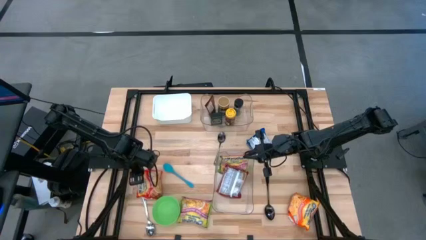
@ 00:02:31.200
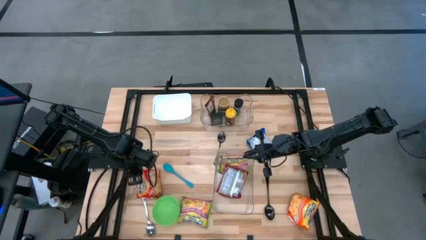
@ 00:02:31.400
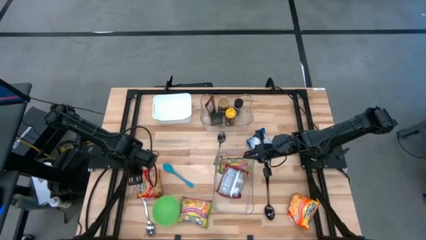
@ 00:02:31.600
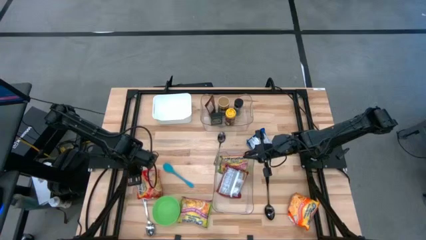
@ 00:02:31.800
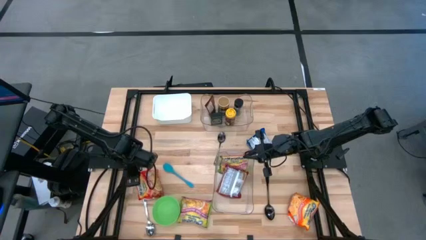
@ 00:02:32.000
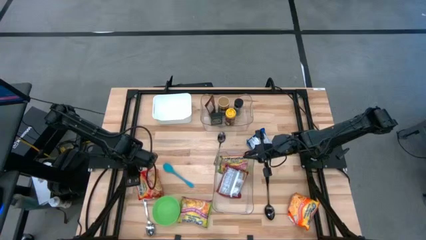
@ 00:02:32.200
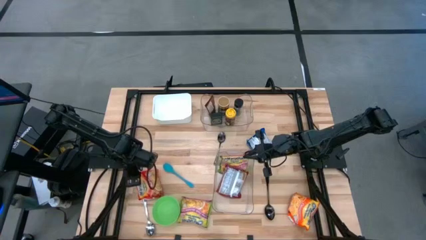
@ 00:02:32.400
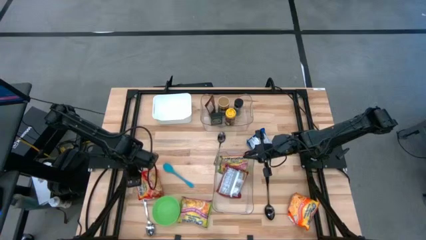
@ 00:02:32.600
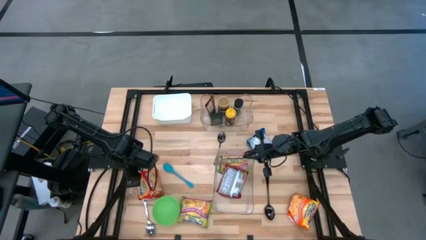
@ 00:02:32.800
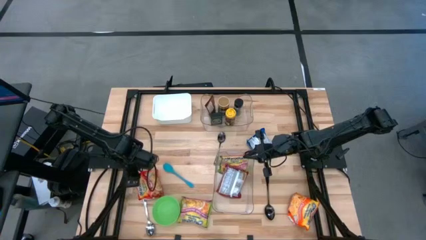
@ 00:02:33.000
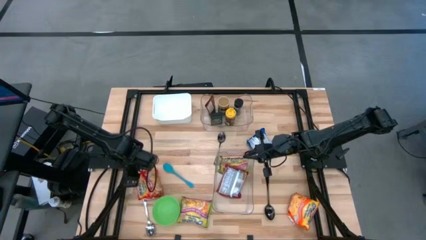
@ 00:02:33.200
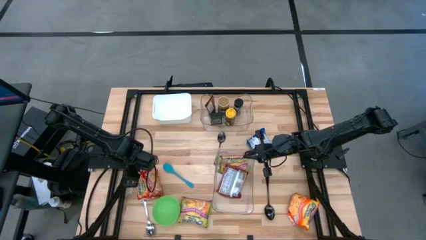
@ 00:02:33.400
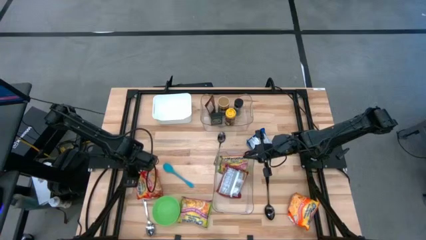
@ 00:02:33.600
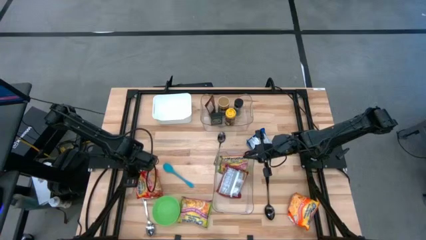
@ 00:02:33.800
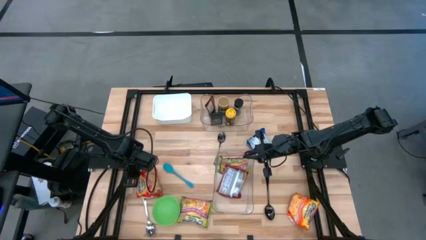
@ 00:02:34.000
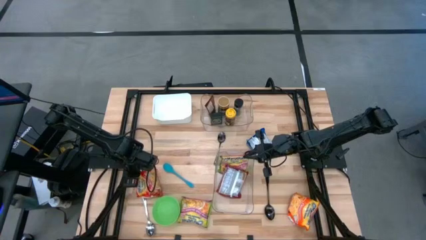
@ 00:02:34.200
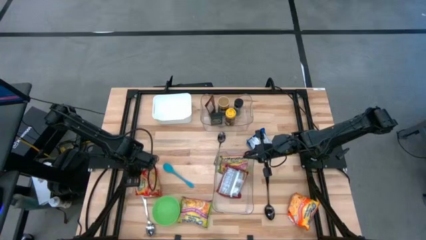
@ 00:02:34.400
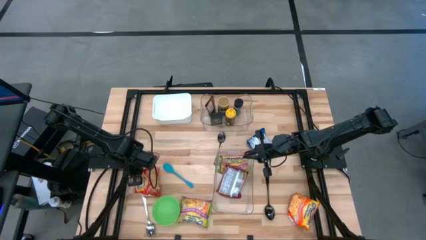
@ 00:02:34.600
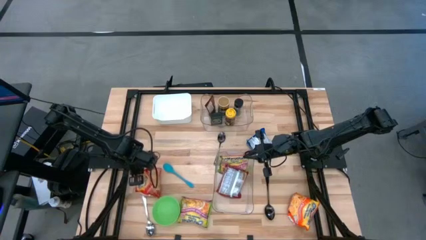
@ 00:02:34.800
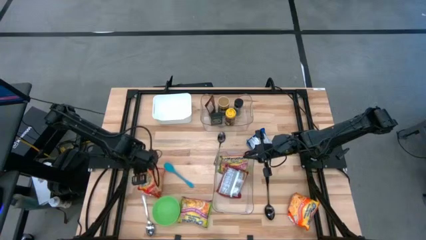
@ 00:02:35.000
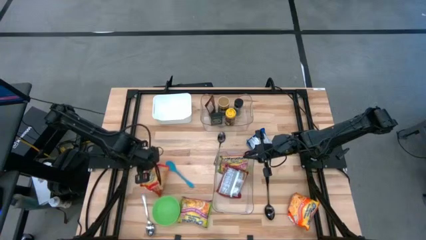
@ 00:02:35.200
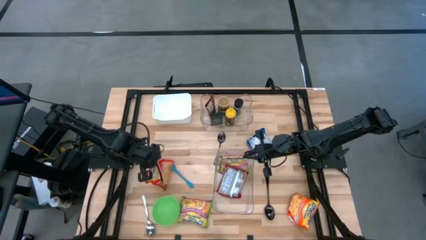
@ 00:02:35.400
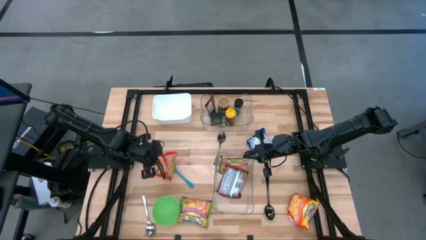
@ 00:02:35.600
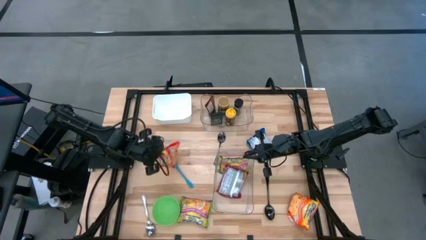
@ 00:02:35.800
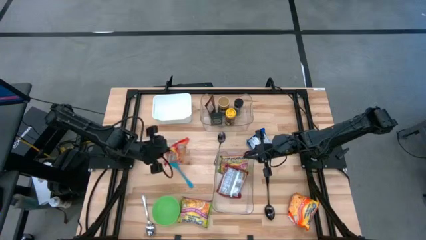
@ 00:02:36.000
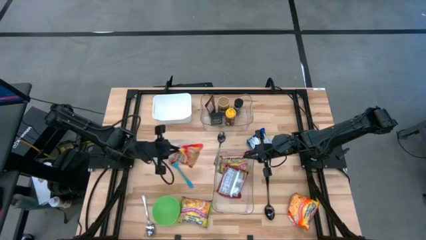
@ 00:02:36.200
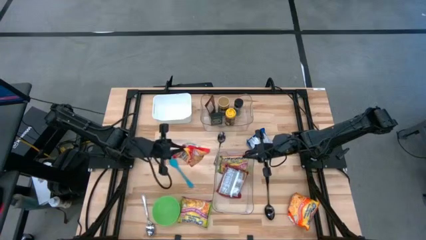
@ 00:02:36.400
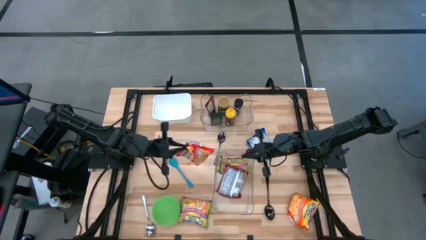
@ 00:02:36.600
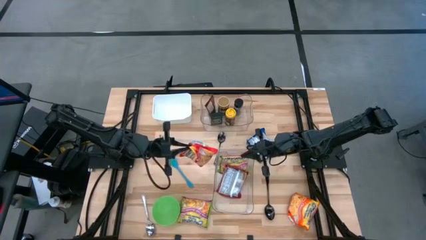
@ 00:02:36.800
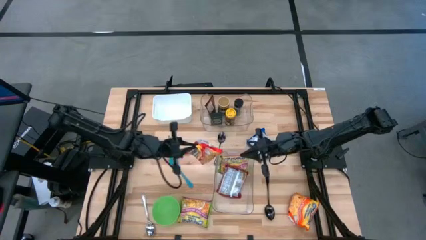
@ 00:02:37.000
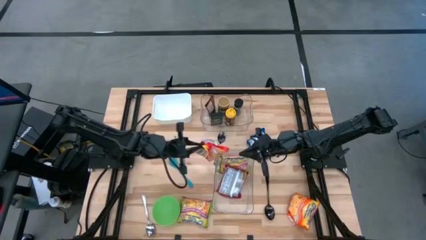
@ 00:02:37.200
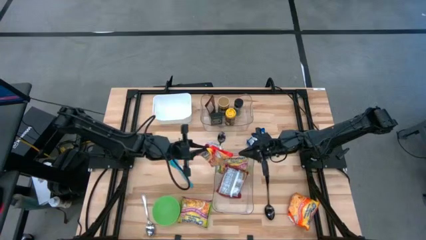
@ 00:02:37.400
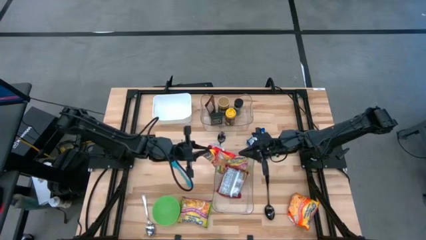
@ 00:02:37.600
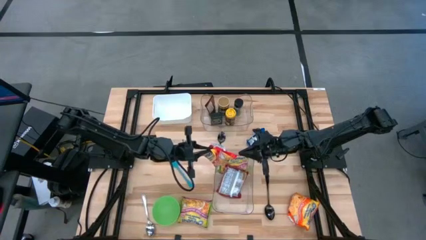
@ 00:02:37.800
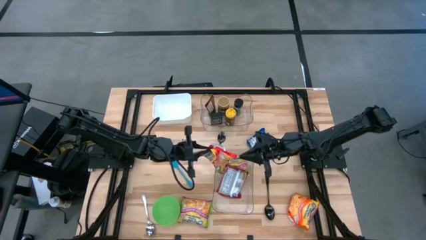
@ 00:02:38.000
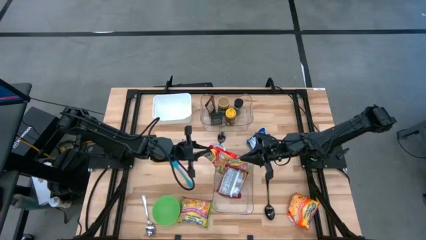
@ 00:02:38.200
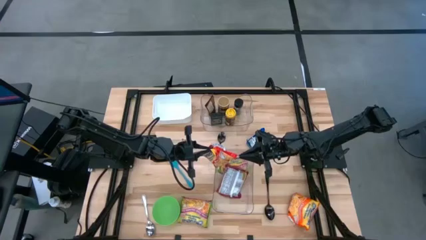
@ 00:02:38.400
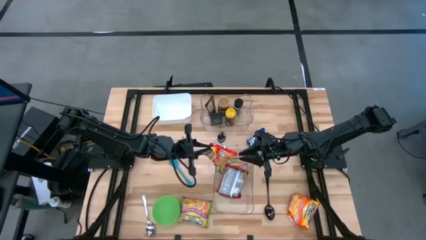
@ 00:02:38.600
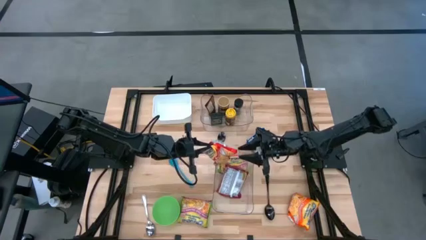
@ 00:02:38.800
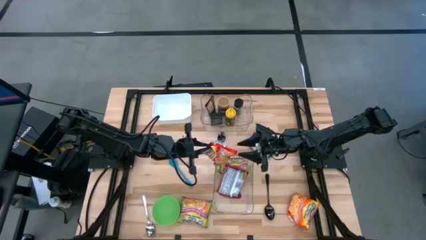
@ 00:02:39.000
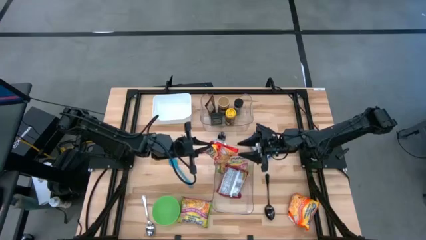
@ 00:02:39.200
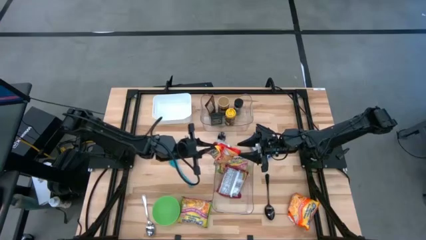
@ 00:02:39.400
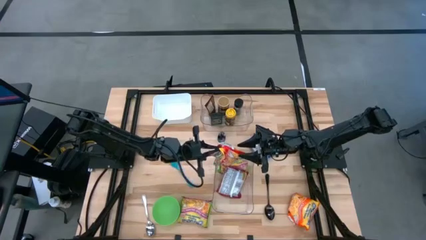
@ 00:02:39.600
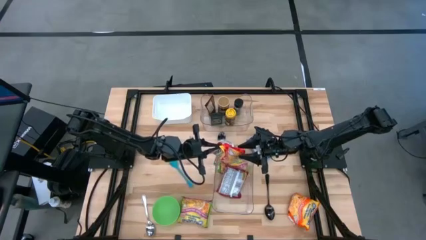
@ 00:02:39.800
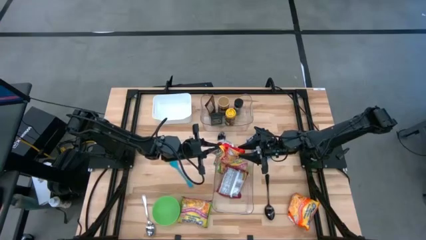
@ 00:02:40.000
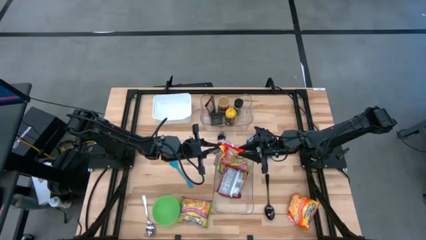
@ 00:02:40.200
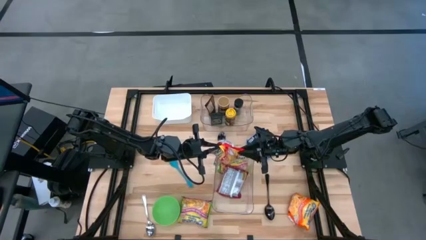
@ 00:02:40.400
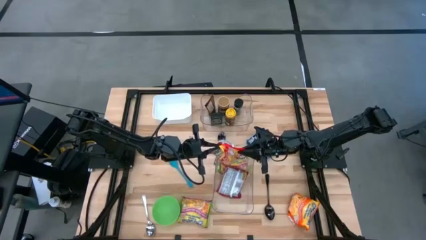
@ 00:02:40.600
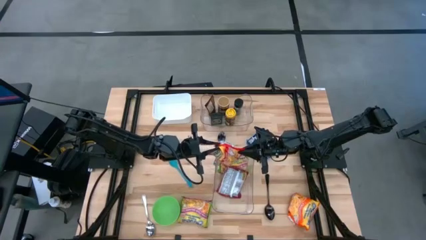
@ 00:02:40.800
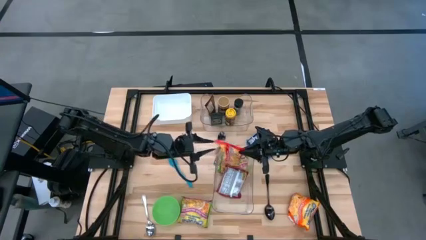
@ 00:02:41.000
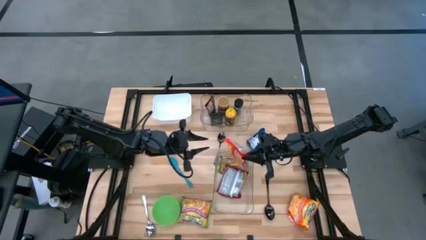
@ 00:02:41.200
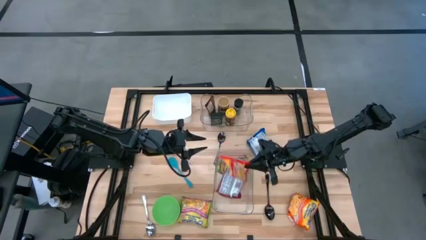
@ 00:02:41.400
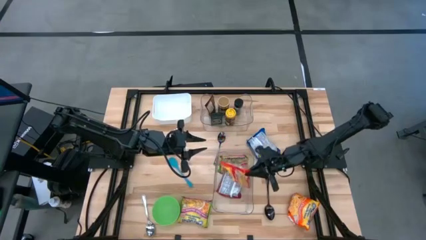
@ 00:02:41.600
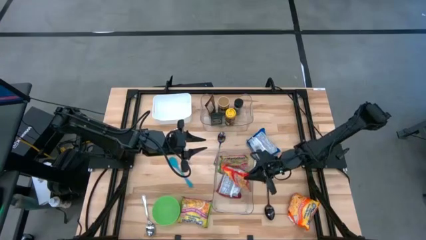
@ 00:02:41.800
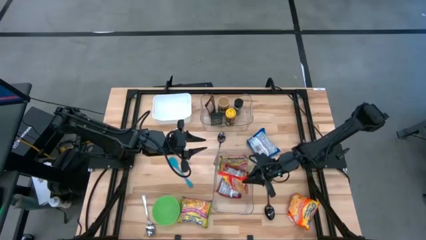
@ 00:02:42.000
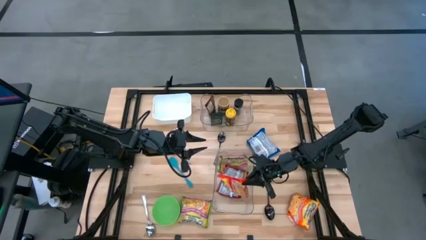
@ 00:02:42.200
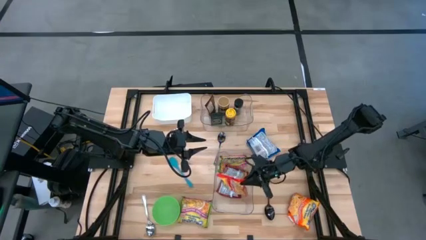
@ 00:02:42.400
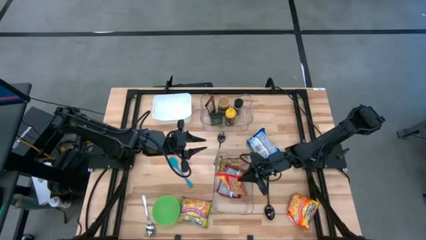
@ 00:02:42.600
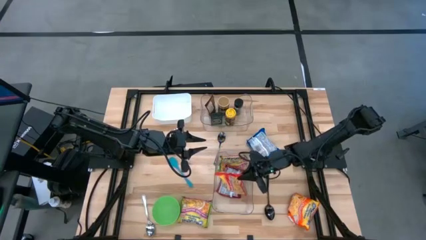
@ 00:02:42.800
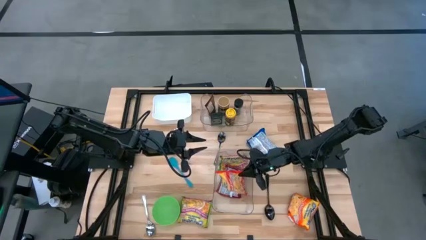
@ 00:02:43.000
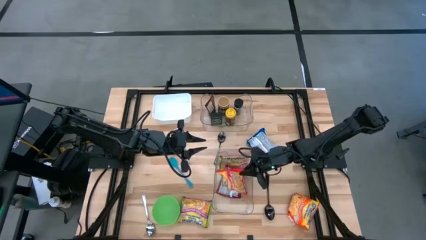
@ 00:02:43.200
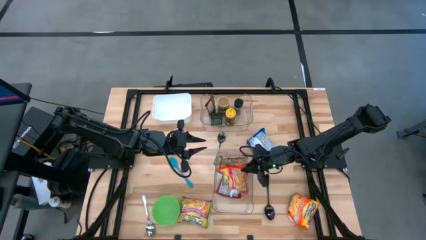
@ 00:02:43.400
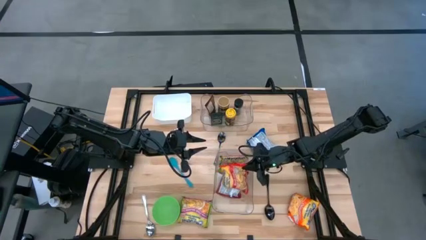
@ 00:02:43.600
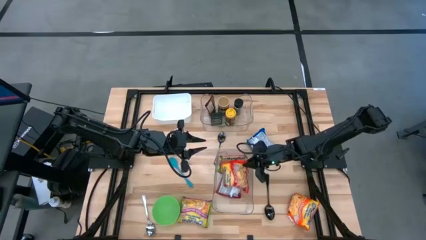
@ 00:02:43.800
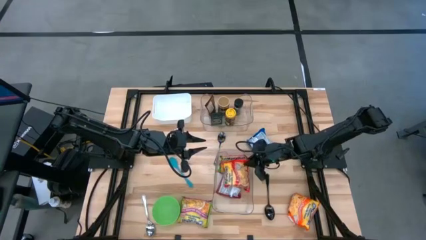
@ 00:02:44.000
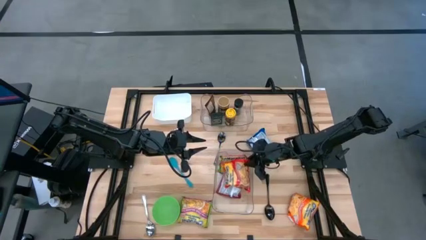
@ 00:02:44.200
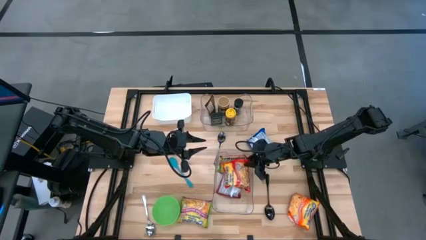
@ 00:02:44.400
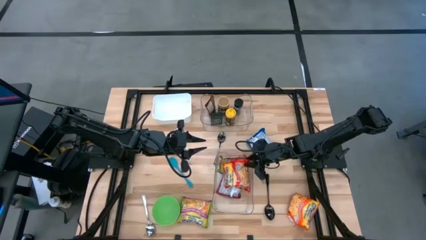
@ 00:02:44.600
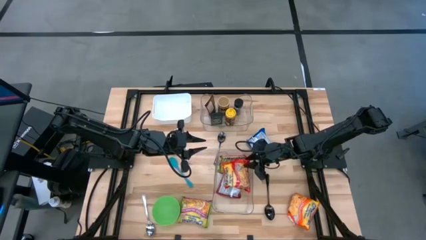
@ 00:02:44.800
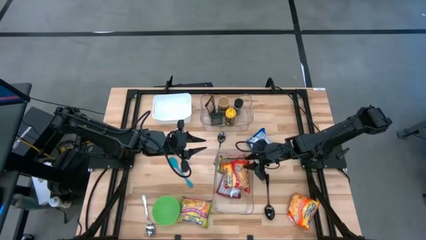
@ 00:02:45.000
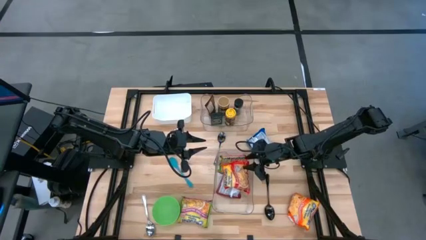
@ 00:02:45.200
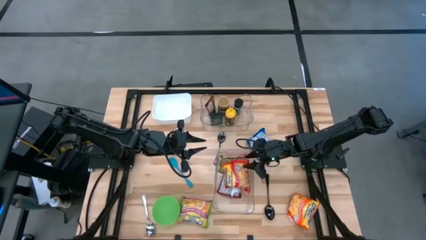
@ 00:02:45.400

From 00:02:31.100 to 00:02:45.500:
Task: Pick & Place Food Item
Put the left orange noodle pack into the bottom transparent bin
